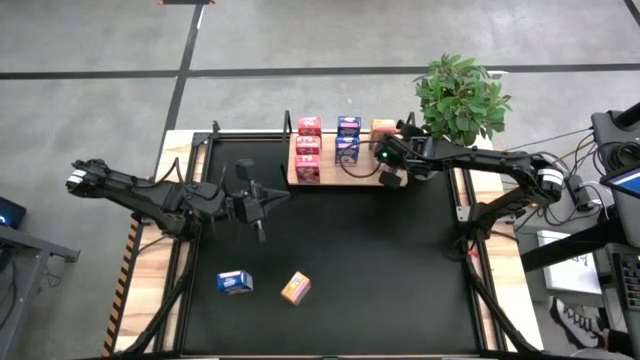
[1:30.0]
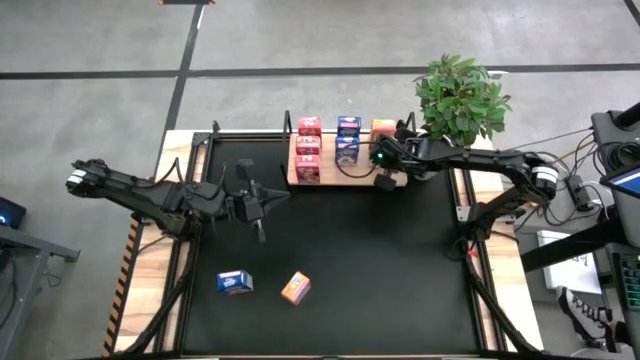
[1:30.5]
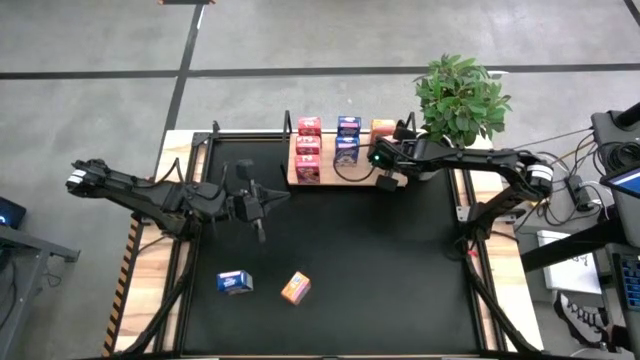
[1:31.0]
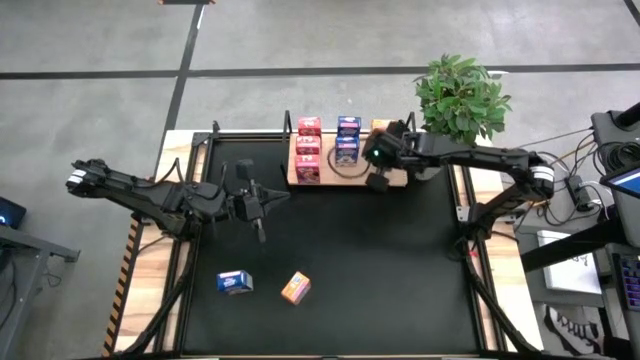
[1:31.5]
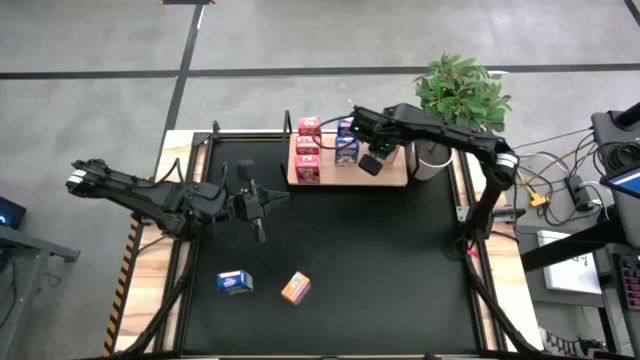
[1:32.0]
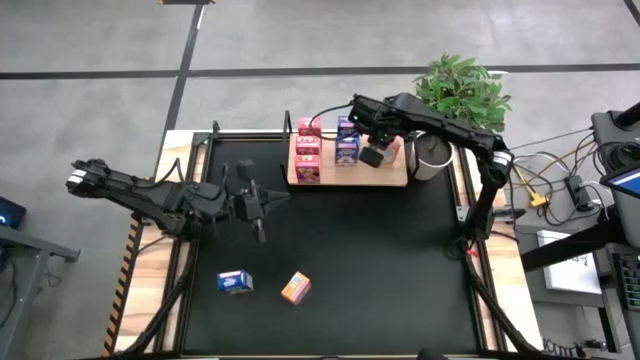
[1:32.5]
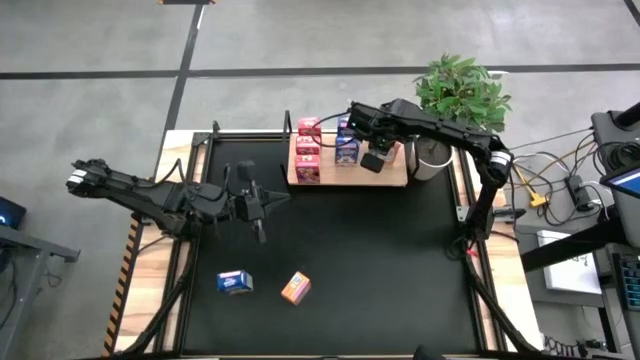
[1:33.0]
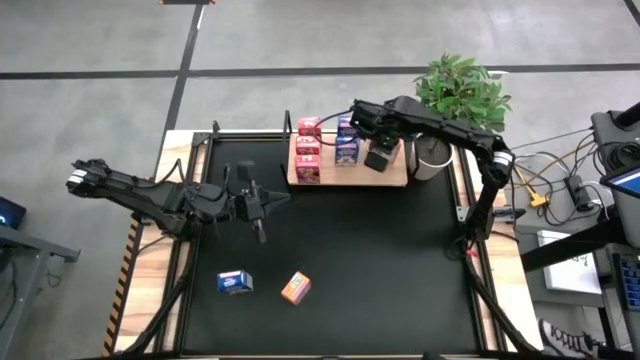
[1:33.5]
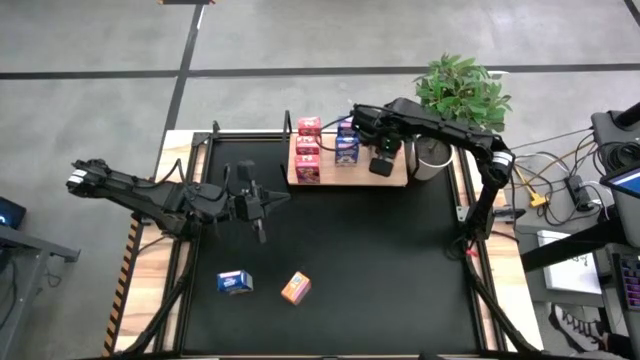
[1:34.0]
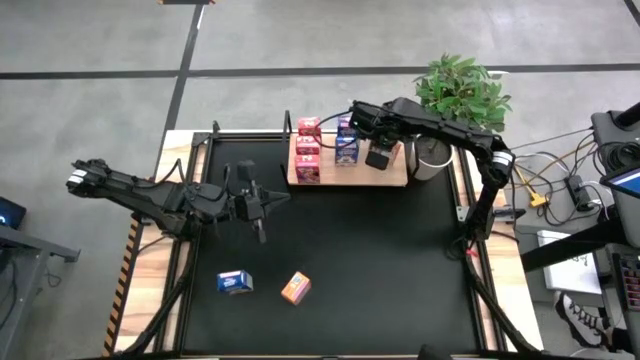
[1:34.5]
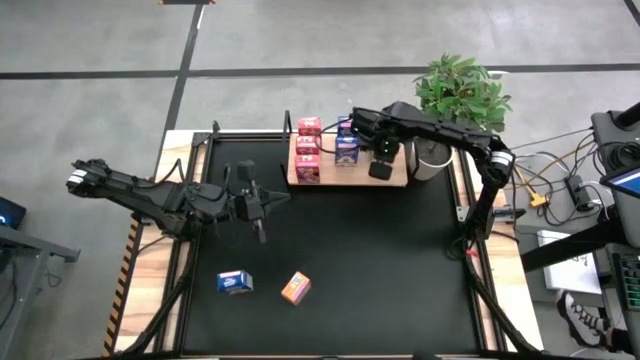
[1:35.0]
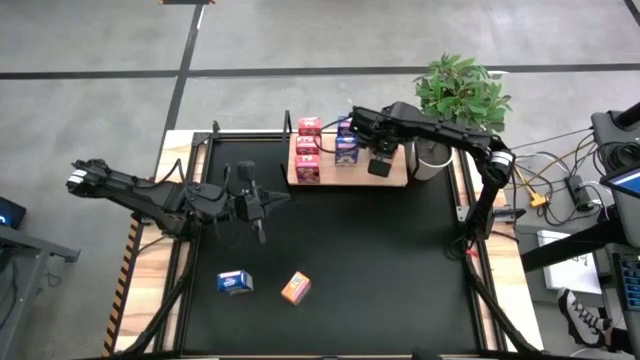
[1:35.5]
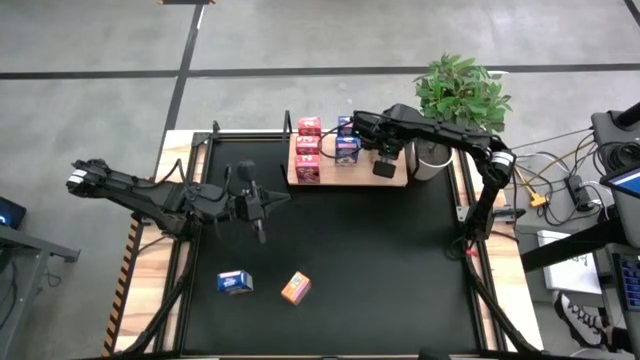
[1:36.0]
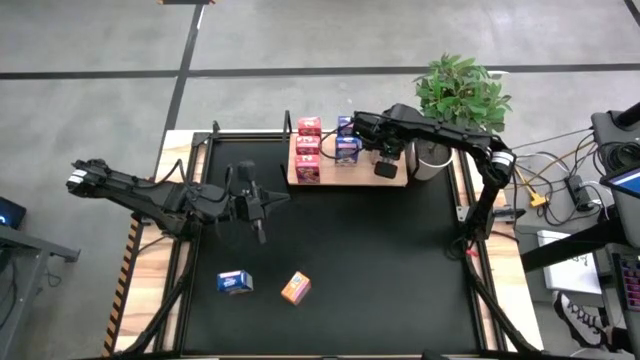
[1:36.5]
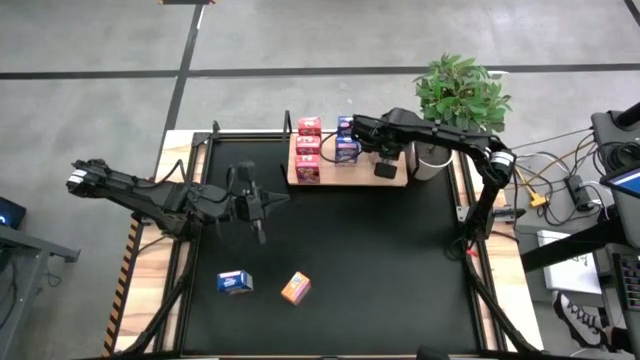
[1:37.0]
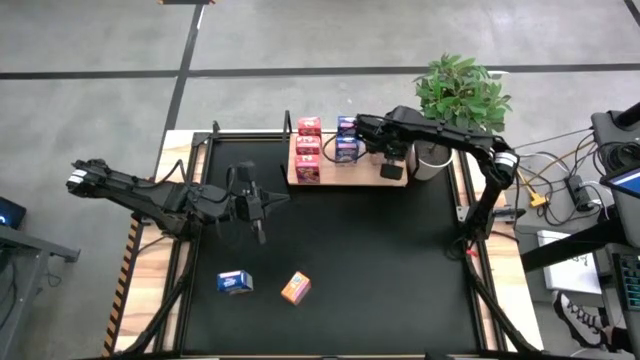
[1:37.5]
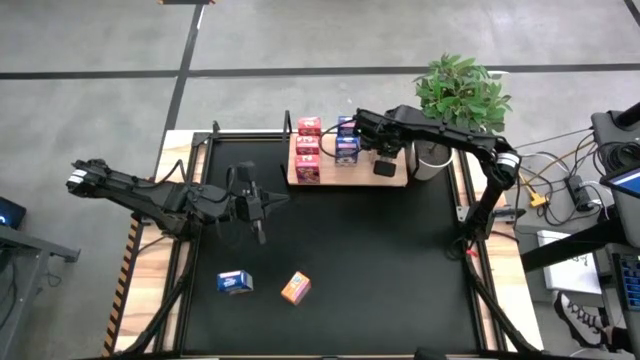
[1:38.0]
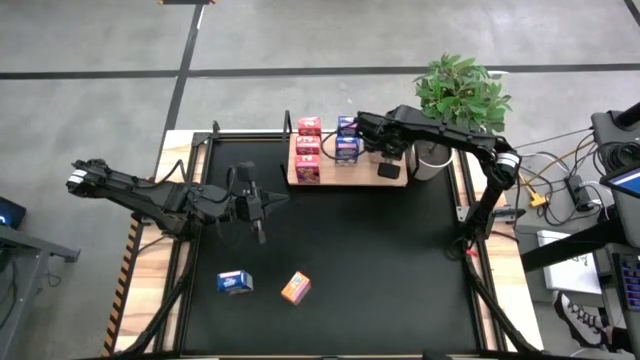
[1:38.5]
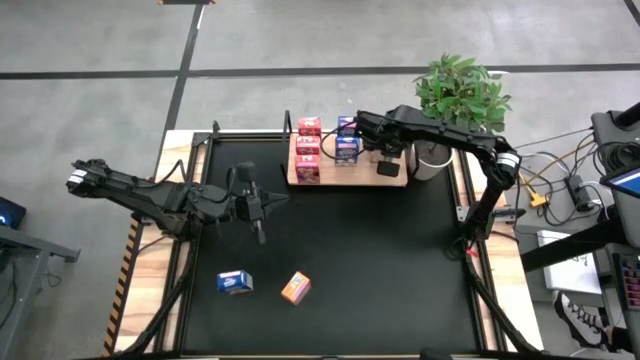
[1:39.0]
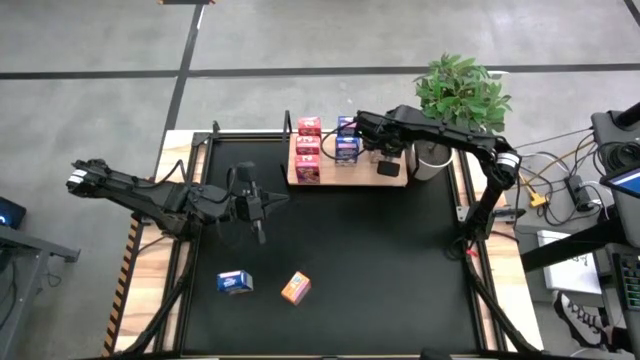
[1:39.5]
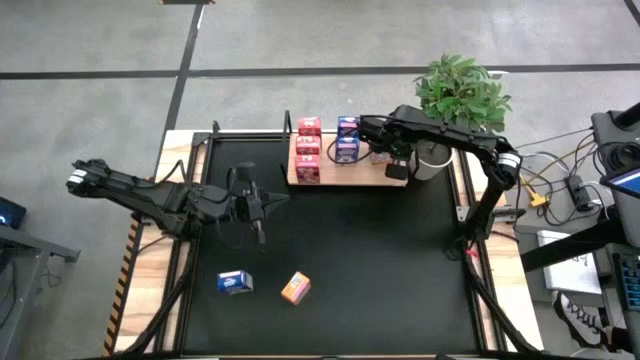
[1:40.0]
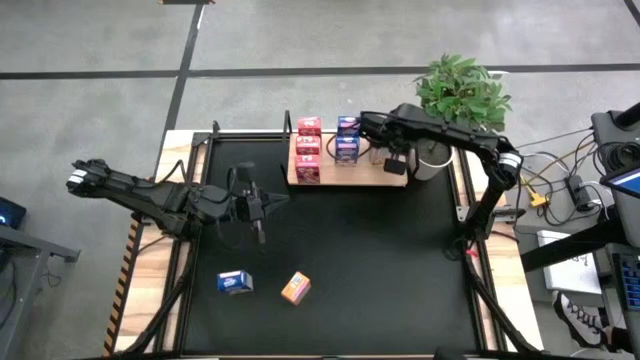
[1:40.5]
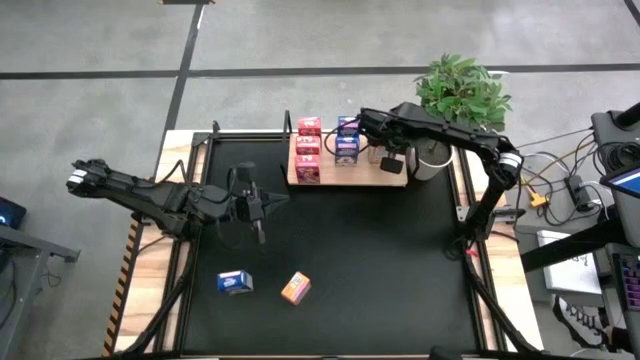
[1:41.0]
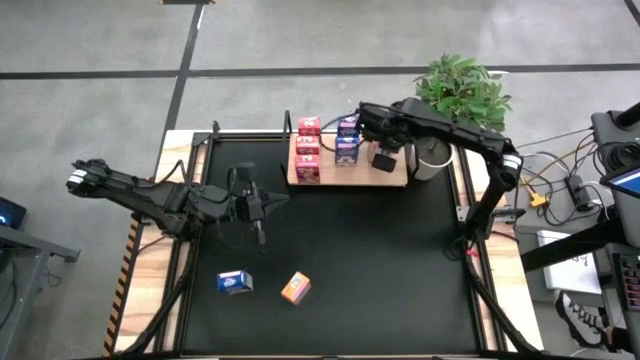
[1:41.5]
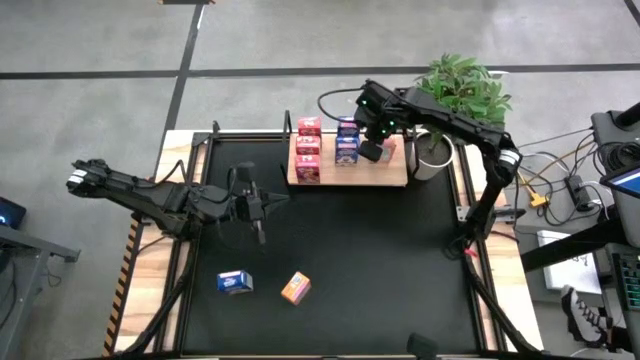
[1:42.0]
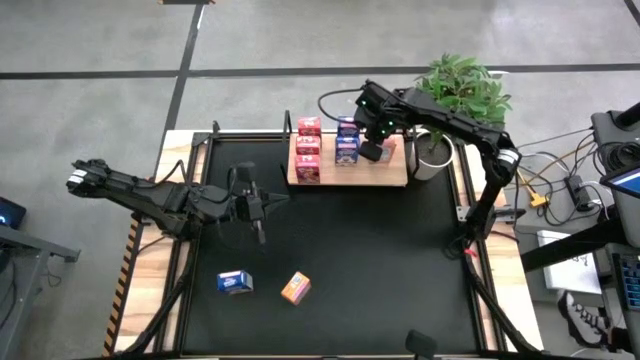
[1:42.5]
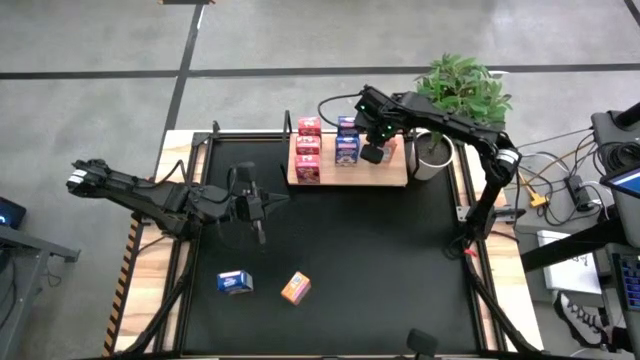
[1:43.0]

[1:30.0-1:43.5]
Task: Stack cereal on shelf
Put the right orange cereal box aligned with the other orange cereal box on the shelf

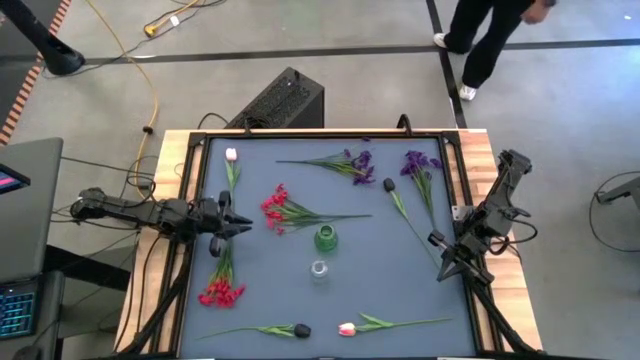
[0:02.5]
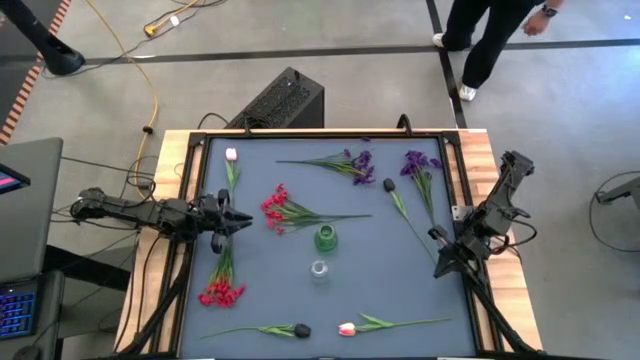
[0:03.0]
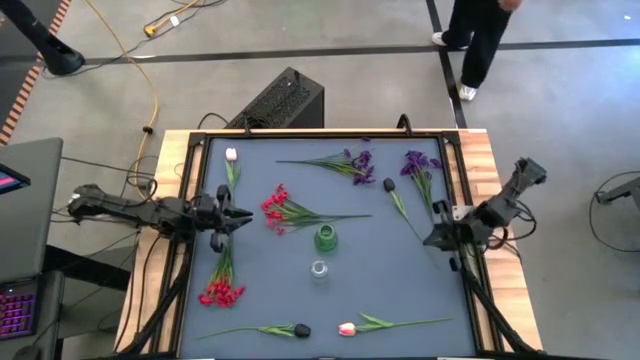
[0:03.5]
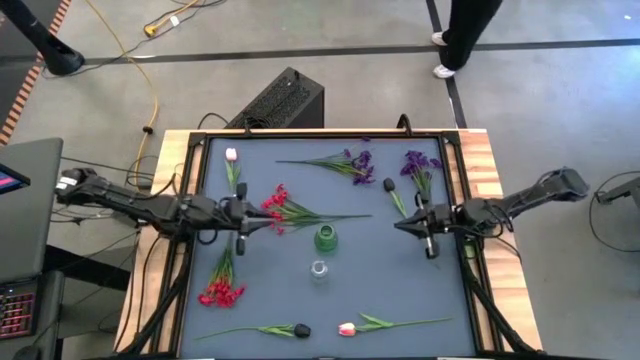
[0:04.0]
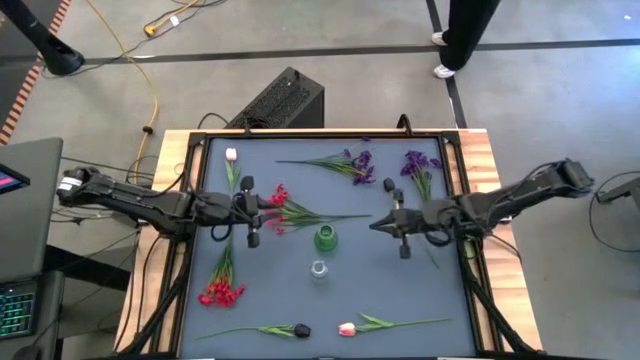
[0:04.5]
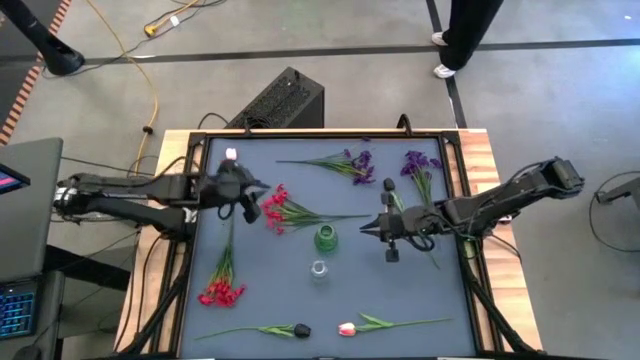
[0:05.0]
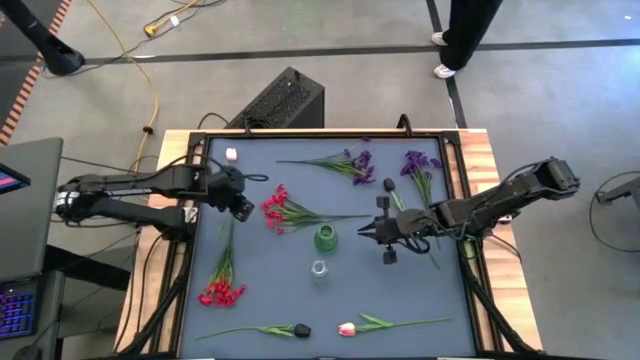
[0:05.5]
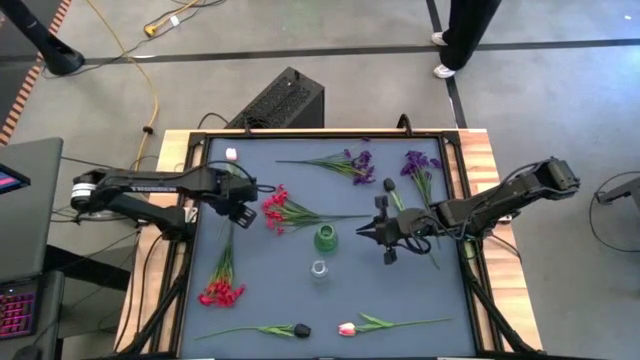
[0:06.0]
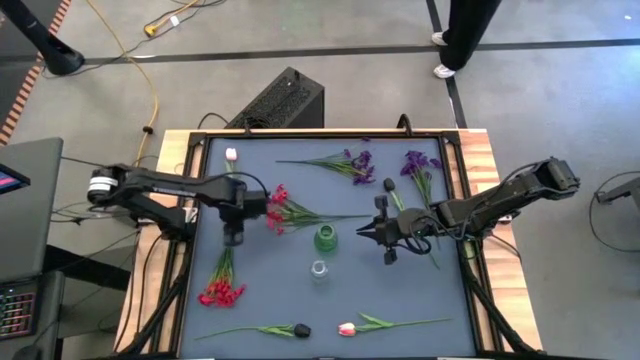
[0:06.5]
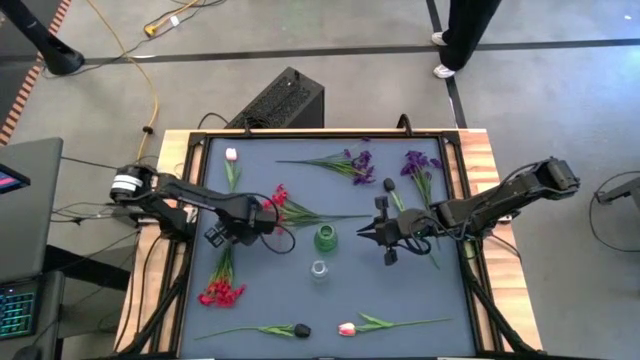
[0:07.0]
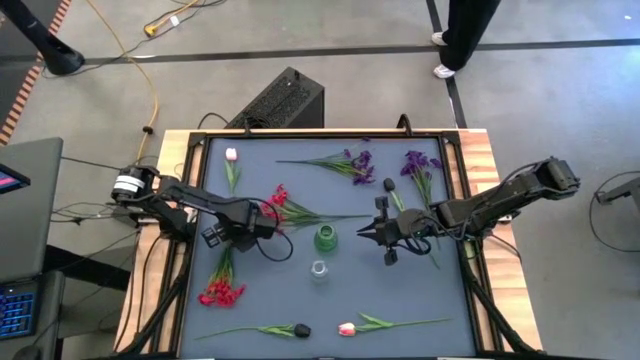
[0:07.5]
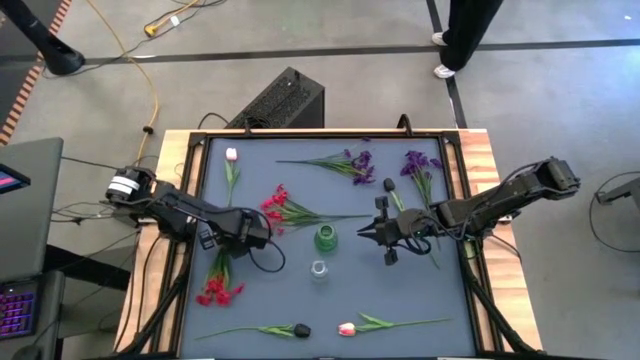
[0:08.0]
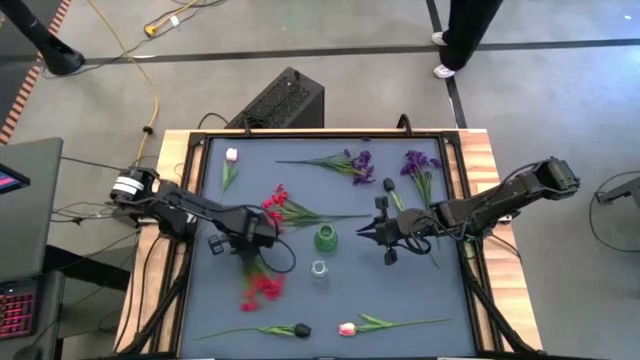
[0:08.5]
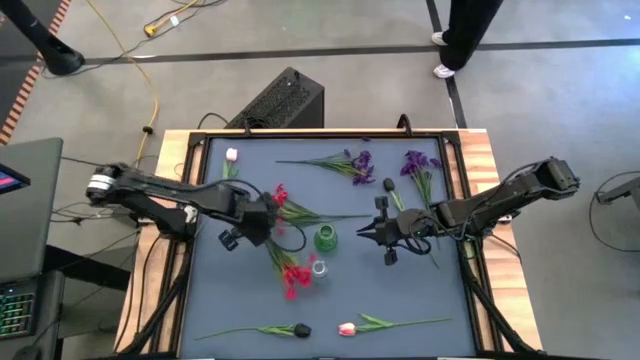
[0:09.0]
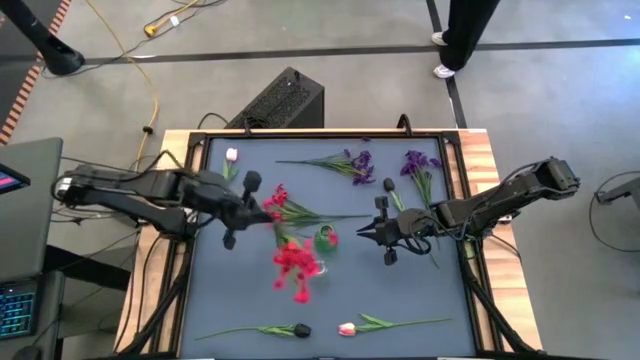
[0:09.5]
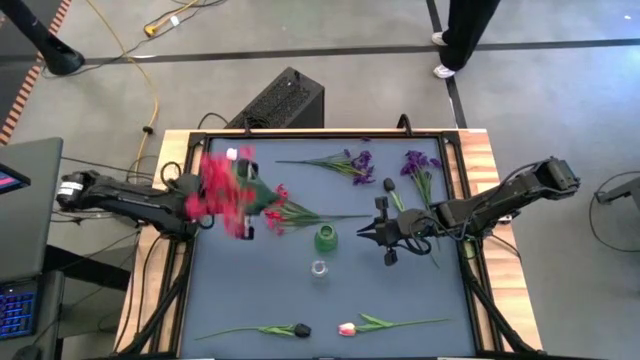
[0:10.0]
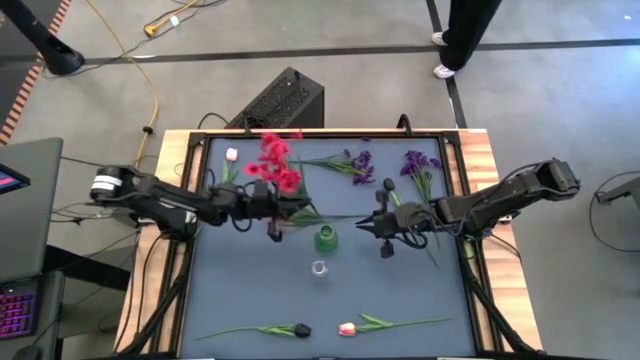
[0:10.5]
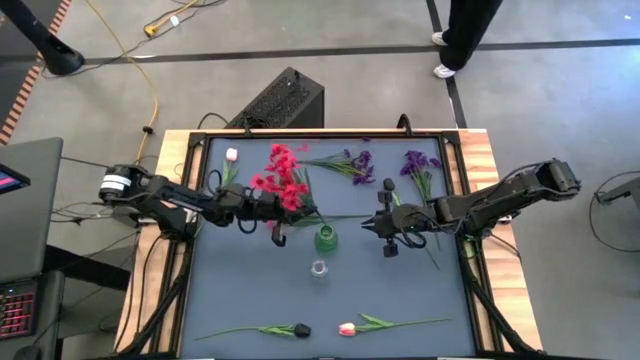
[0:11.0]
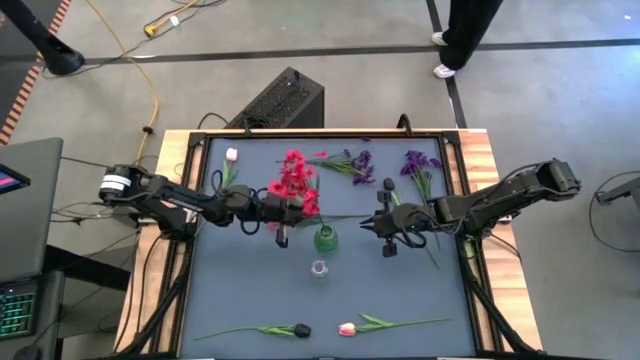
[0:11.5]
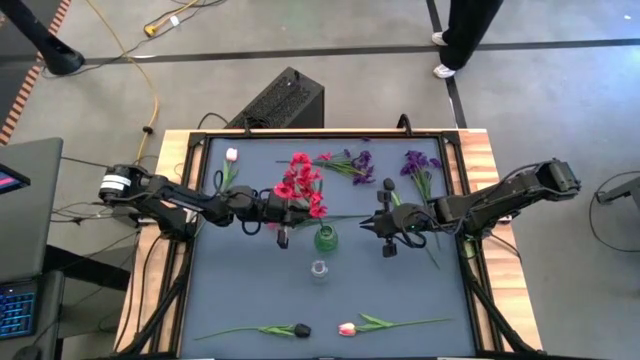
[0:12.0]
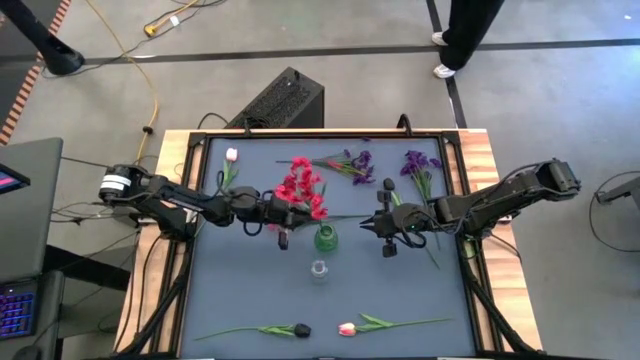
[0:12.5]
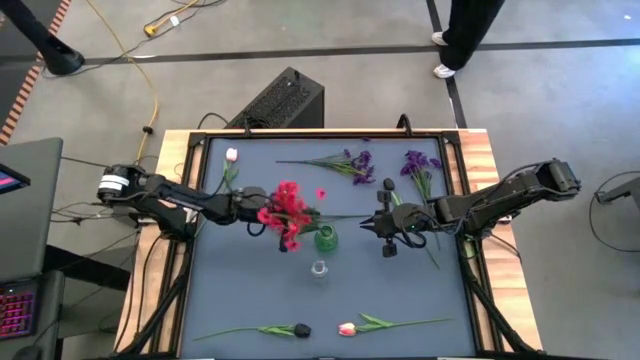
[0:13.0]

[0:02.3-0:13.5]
Task: Sort flowers into vase by color
Put the left red flowers into the green vase
